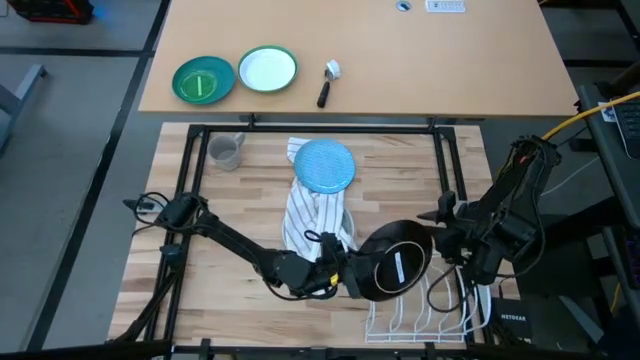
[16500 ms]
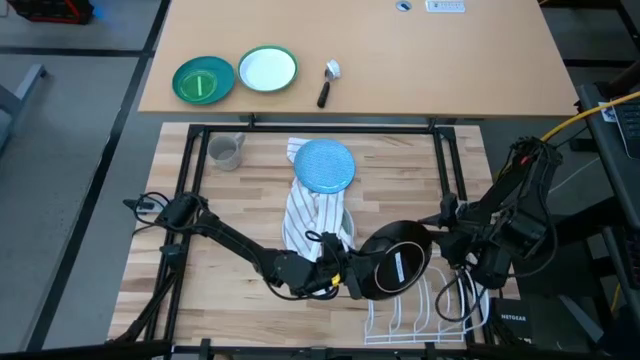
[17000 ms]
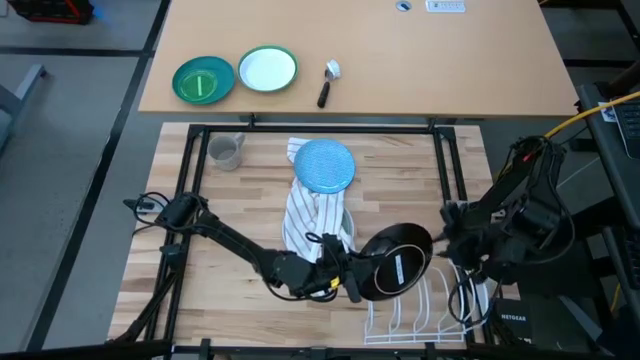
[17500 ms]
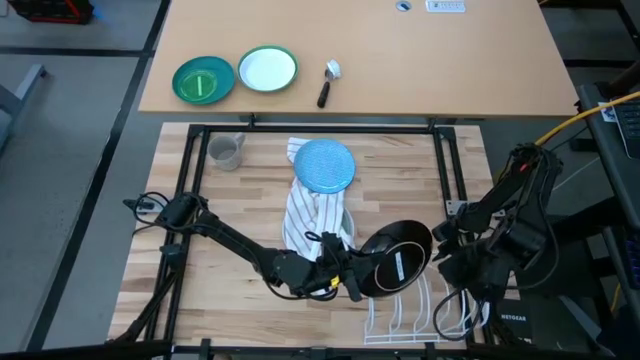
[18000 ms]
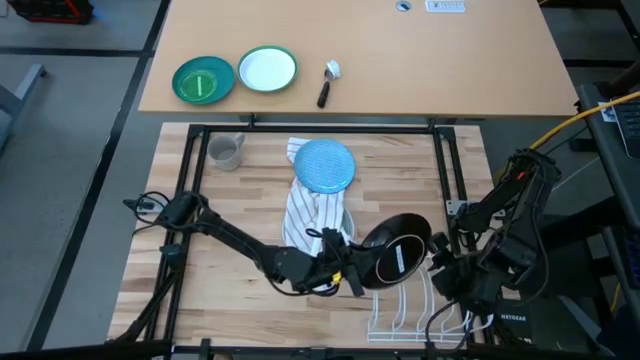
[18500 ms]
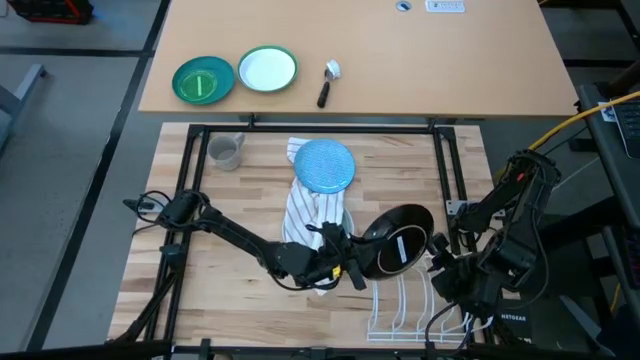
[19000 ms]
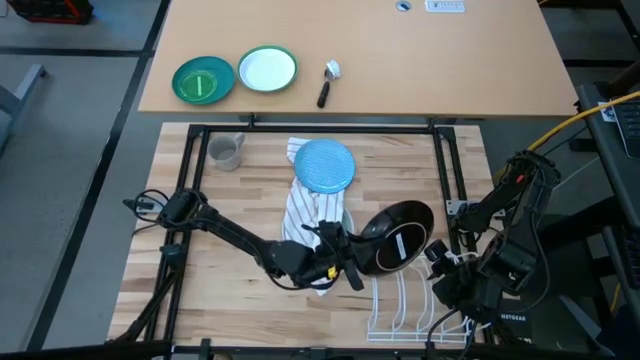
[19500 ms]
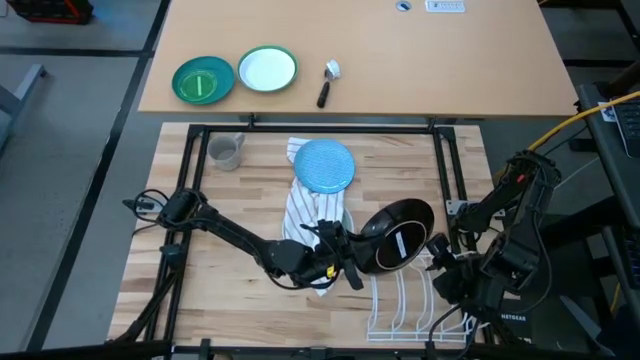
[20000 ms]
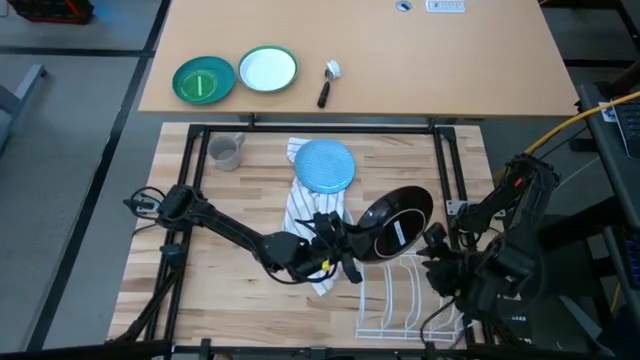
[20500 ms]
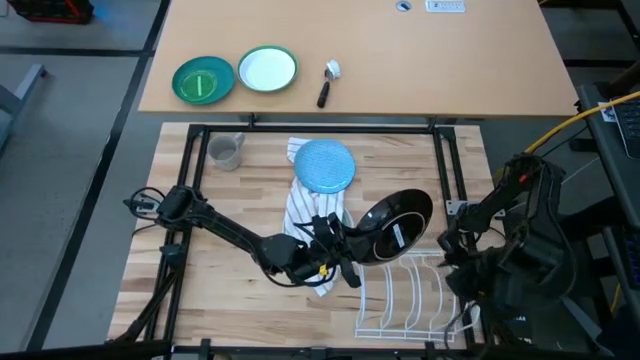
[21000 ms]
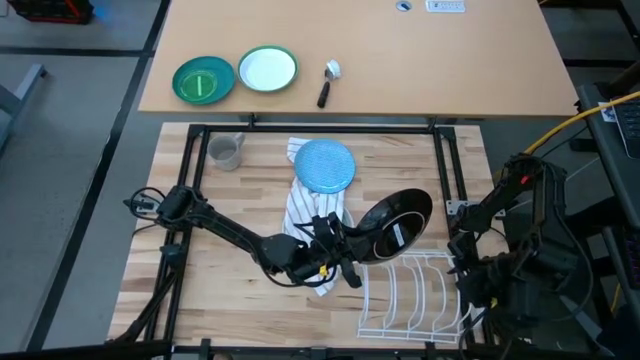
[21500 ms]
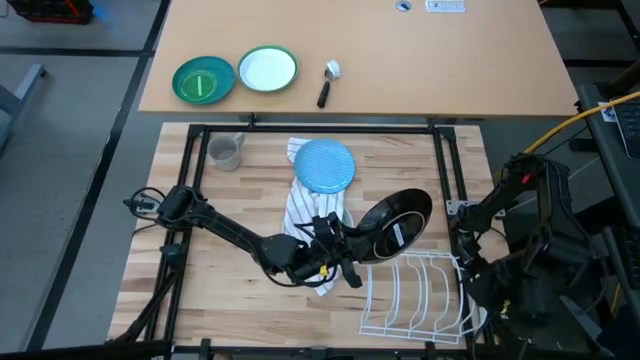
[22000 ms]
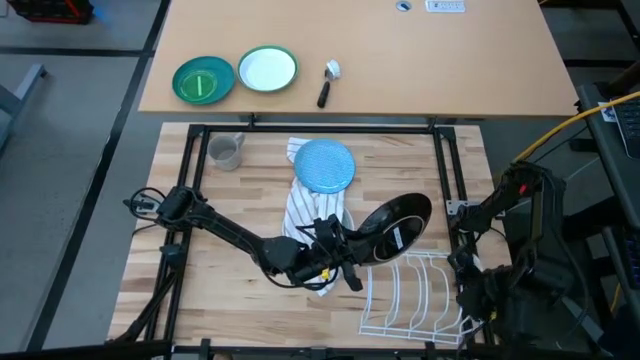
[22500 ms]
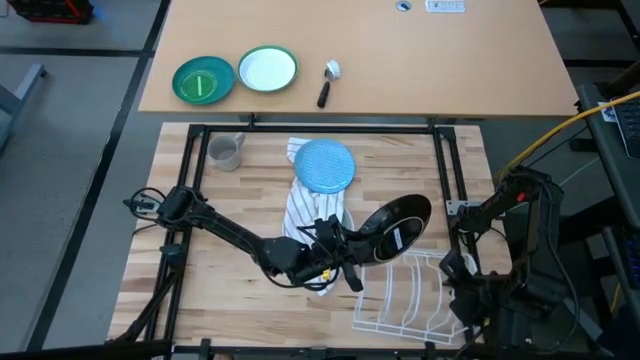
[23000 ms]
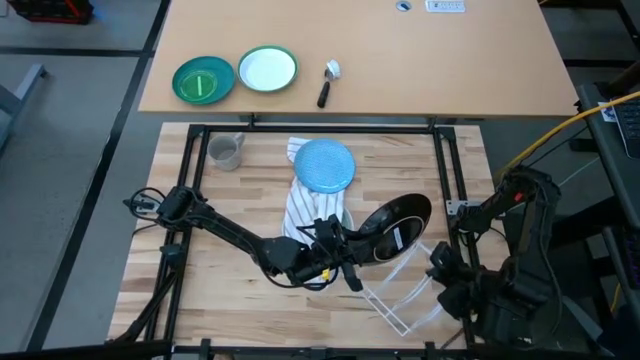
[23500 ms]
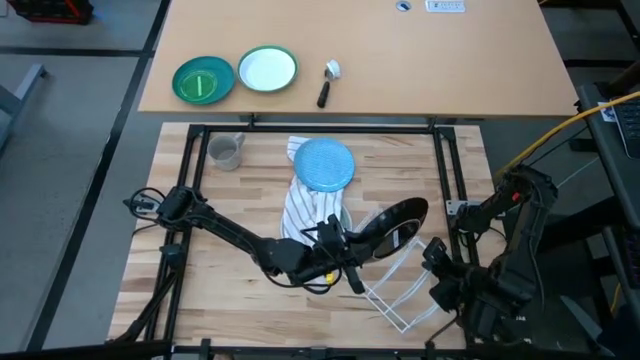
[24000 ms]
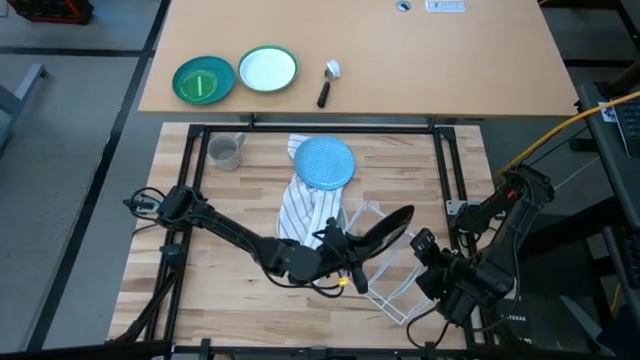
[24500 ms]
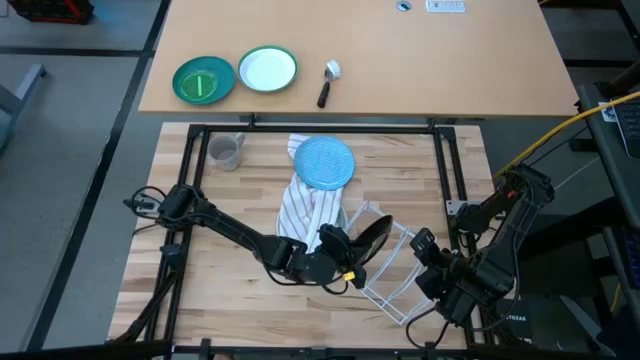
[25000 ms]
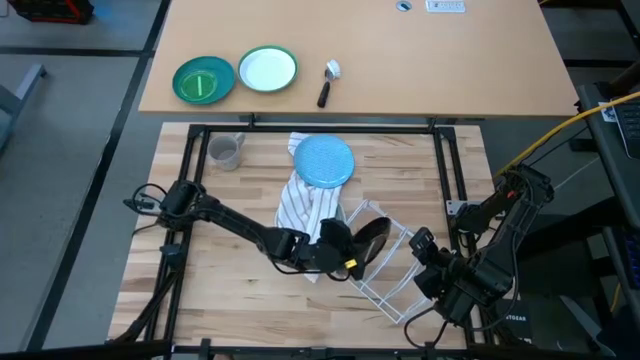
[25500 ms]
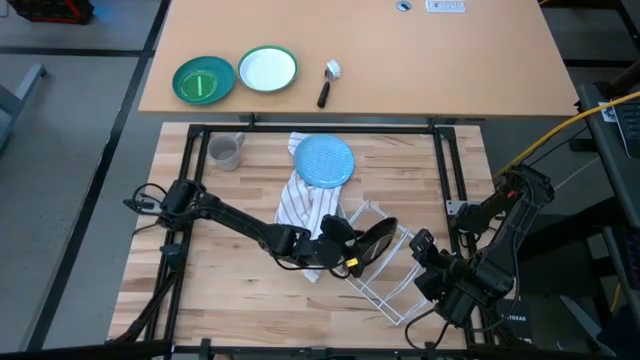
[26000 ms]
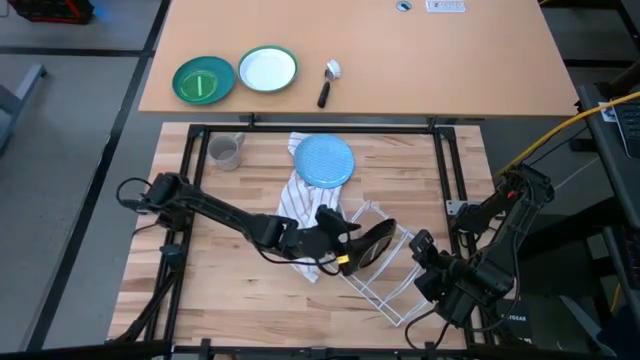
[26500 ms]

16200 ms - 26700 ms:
Task: Sort dishes
Put the red plate into the dish rack

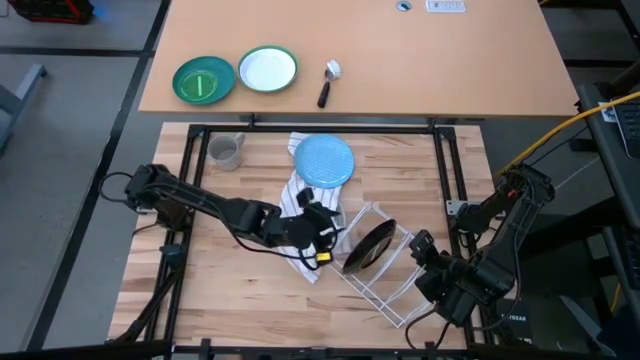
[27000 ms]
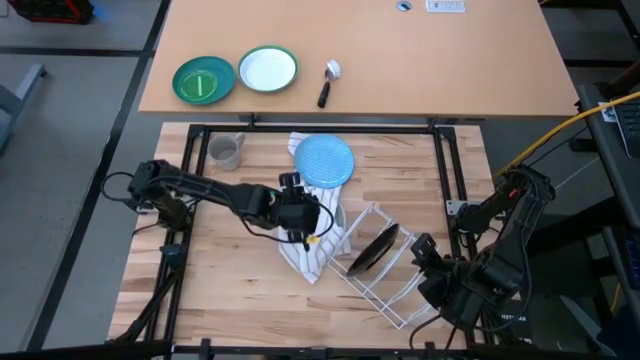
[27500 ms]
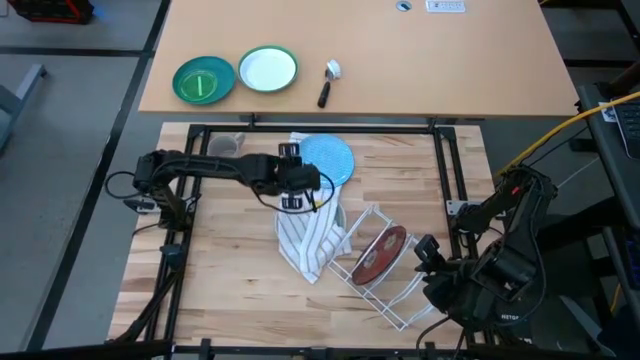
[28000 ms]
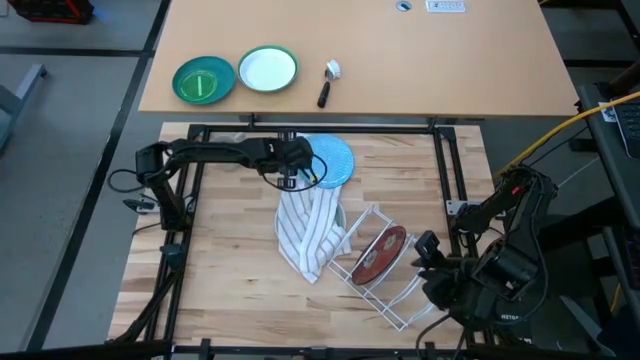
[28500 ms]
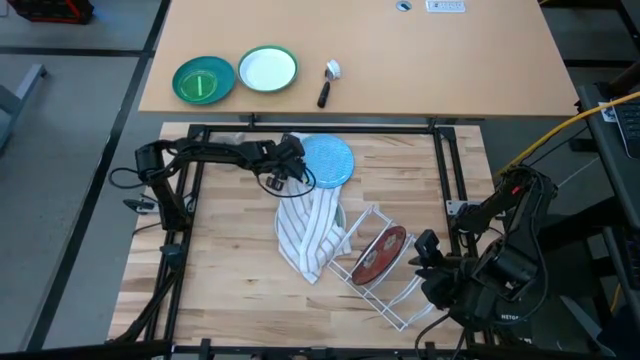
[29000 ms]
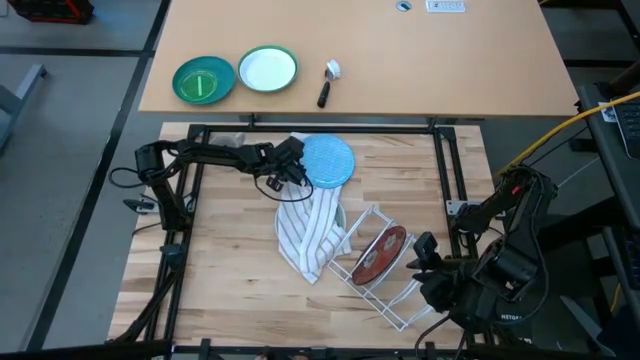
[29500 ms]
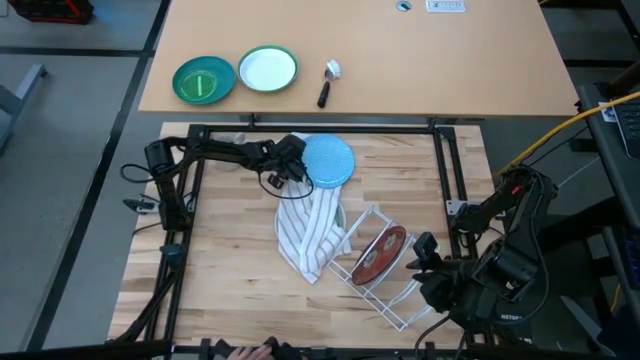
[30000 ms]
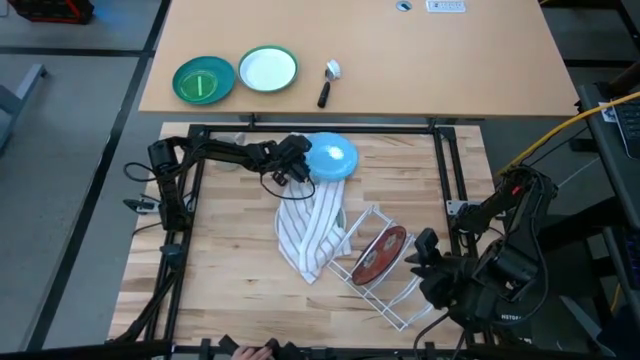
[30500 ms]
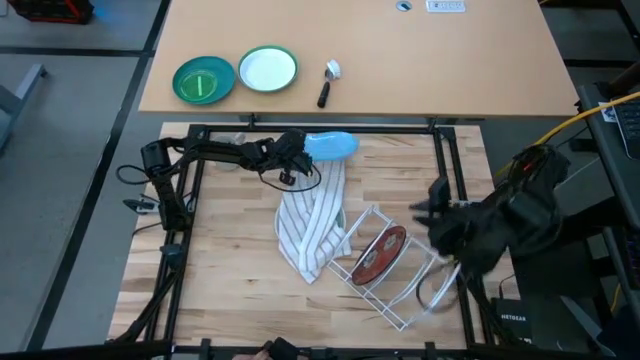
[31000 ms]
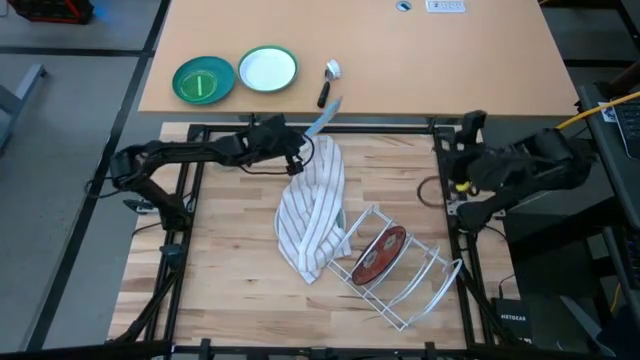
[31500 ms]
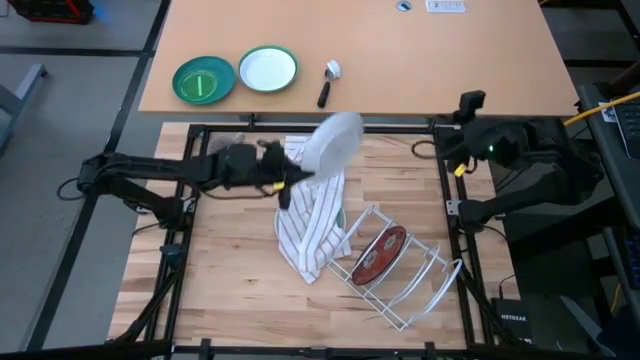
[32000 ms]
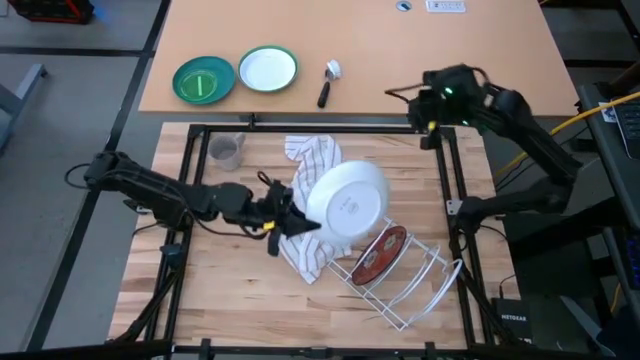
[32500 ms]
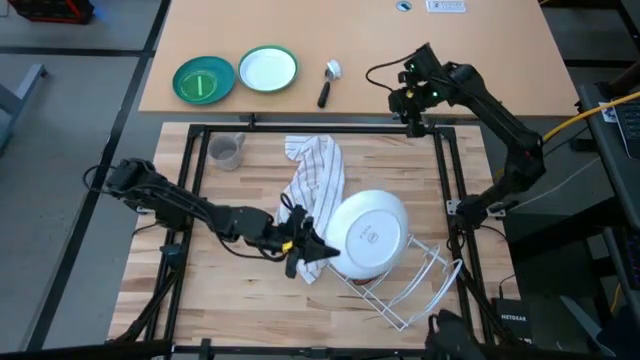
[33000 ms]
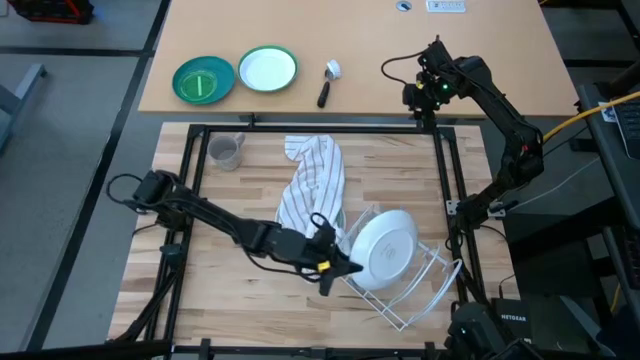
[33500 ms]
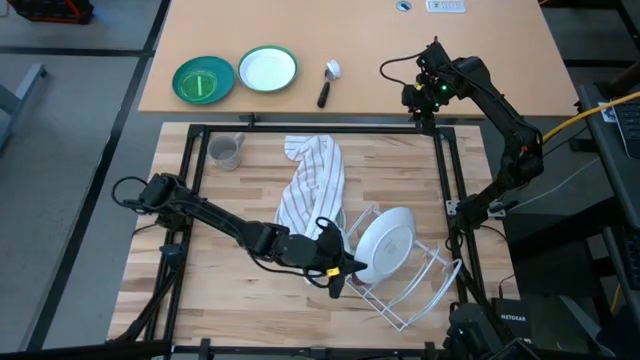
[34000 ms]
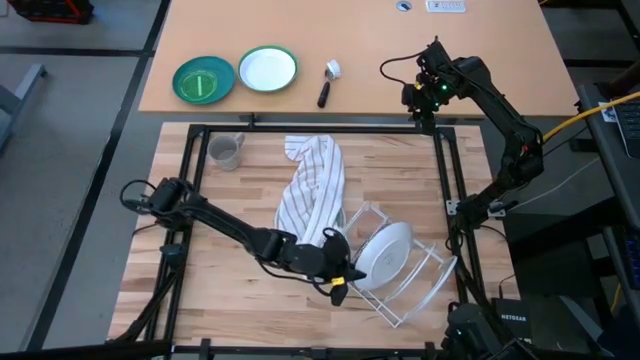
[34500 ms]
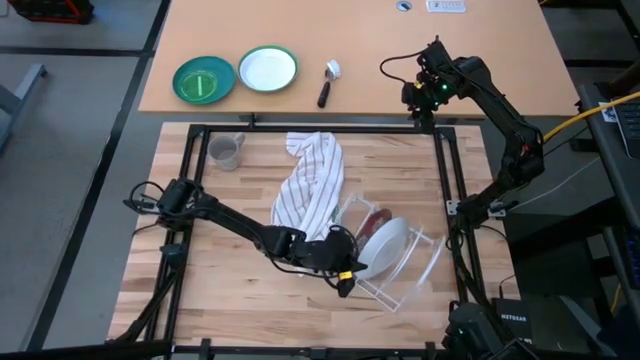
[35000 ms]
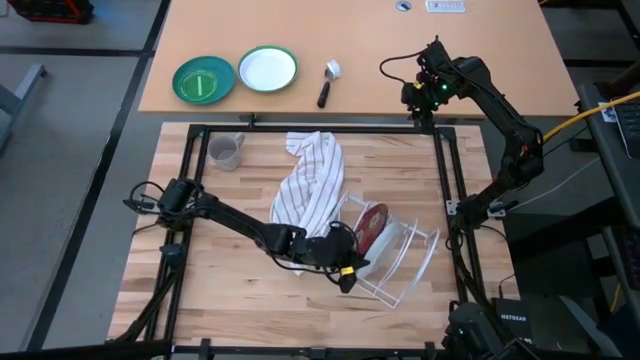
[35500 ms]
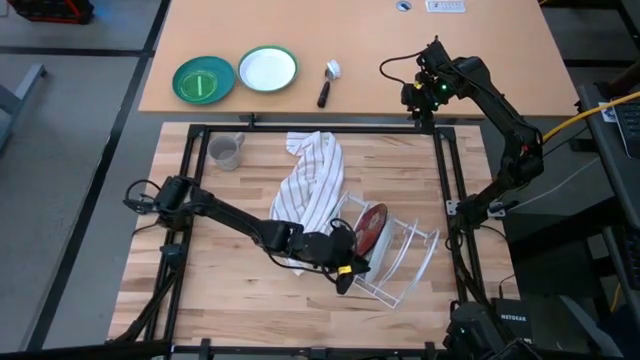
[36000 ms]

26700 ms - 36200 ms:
Put the blue plate into the dish rack

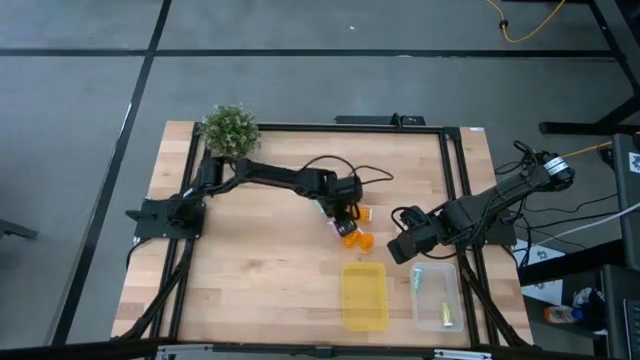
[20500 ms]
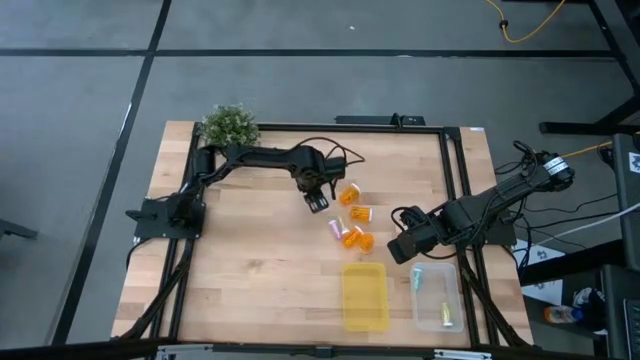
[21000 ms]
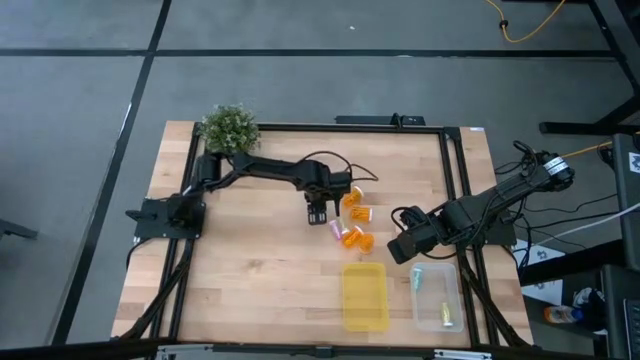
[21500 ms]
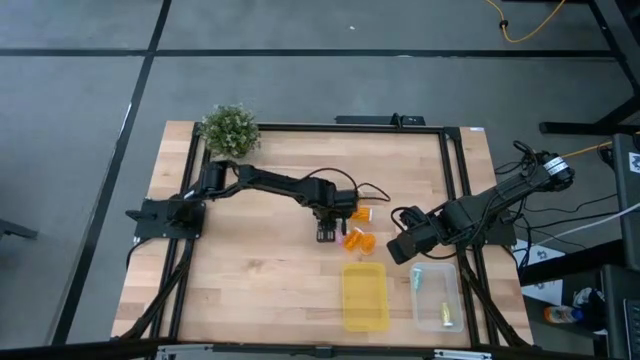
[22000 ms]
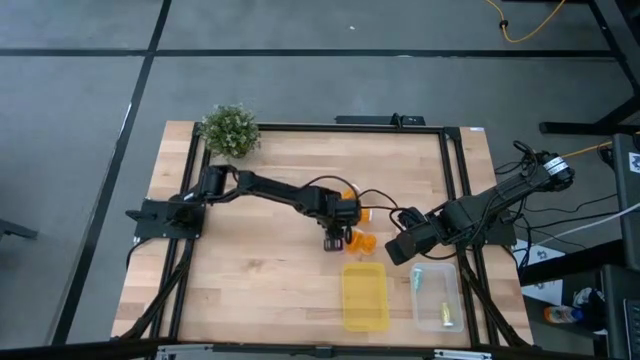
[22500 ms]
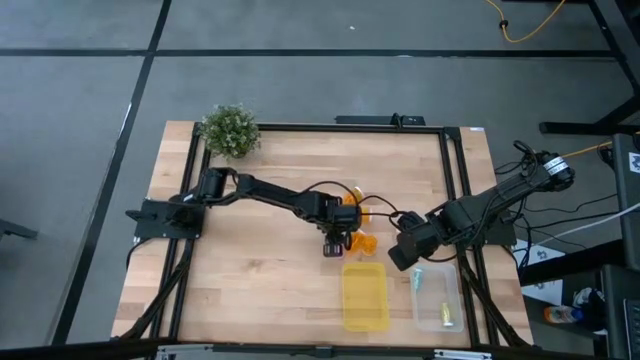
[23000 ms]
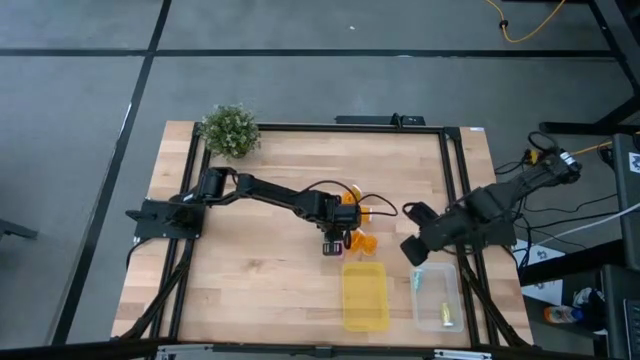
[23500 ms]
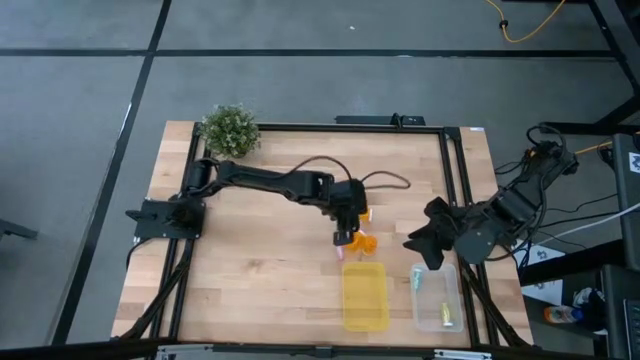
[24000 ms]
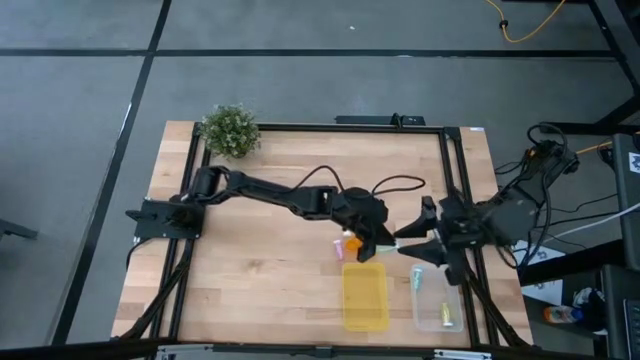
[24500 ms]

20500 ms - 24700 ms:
Task: Pick and place medicine bottles into bin by pill shape (circle, oval)
Put the blue tablet bottle into the transparent bin
